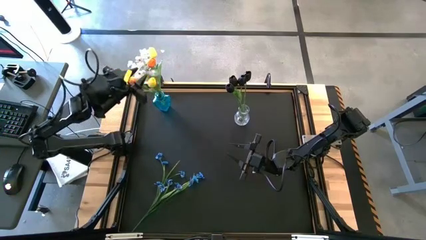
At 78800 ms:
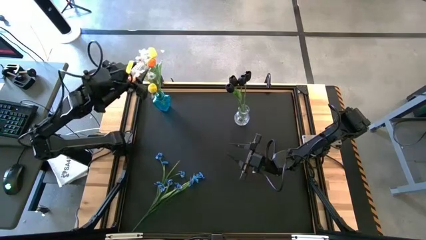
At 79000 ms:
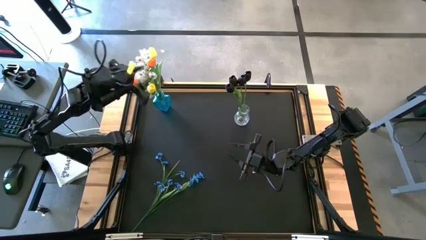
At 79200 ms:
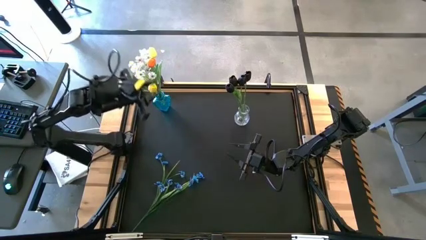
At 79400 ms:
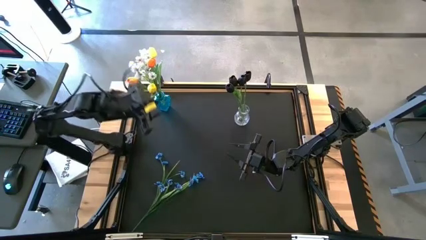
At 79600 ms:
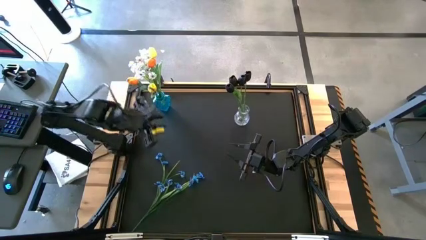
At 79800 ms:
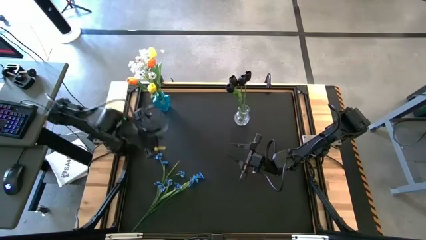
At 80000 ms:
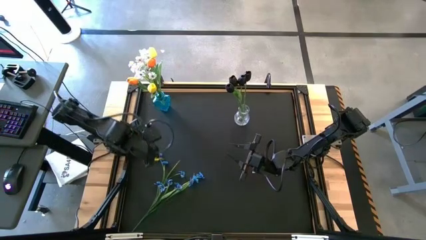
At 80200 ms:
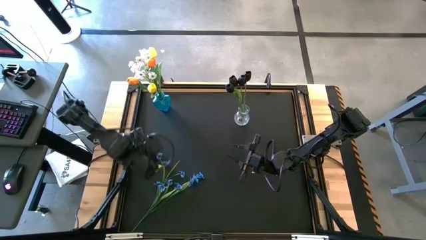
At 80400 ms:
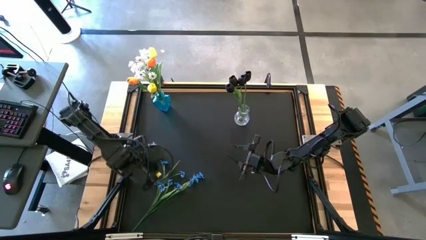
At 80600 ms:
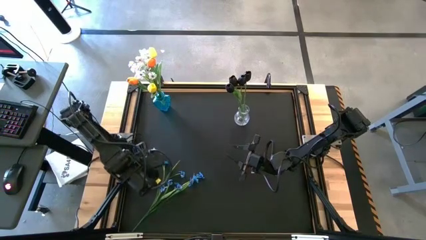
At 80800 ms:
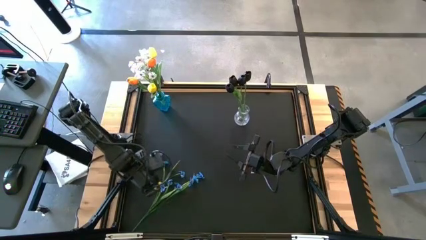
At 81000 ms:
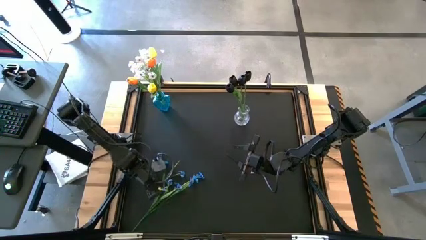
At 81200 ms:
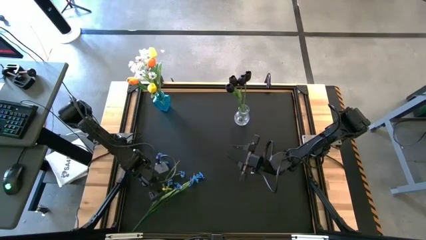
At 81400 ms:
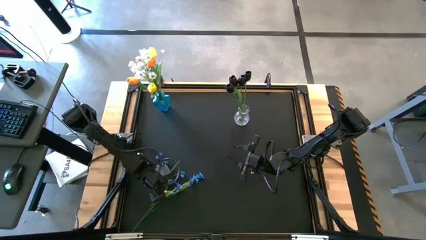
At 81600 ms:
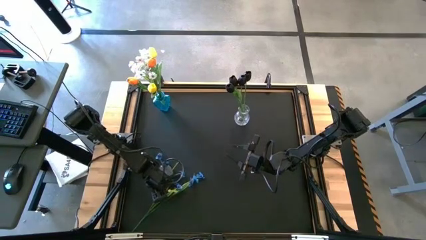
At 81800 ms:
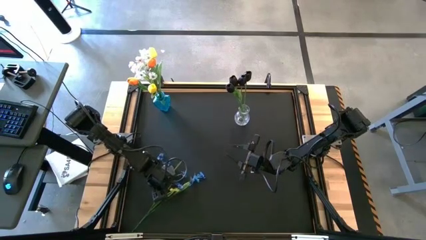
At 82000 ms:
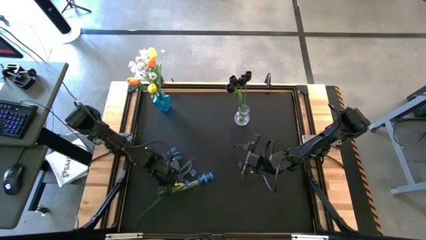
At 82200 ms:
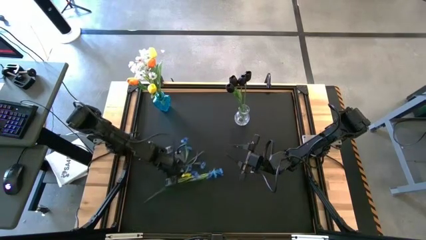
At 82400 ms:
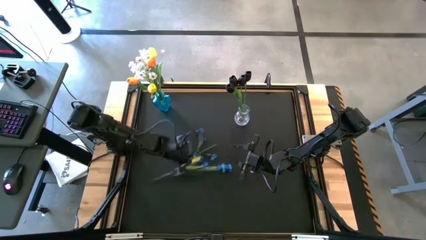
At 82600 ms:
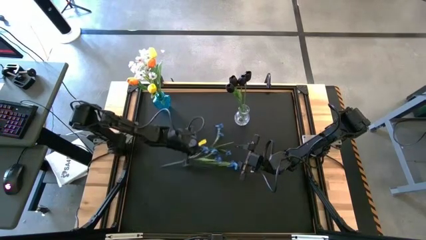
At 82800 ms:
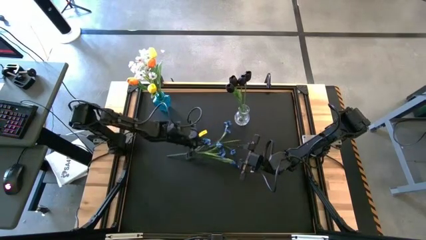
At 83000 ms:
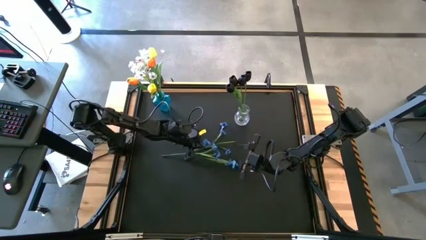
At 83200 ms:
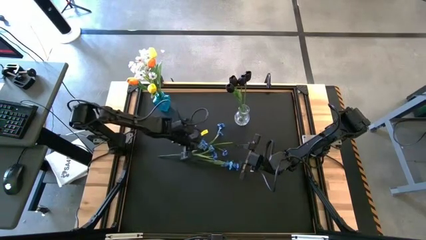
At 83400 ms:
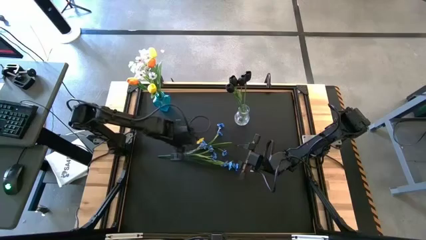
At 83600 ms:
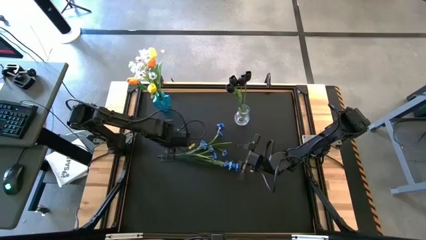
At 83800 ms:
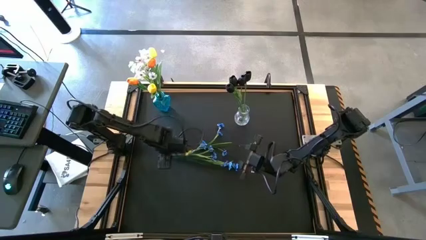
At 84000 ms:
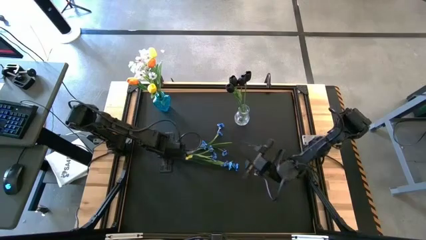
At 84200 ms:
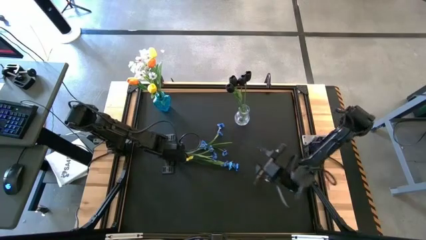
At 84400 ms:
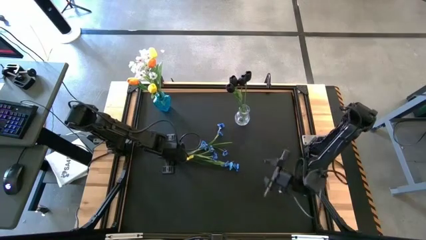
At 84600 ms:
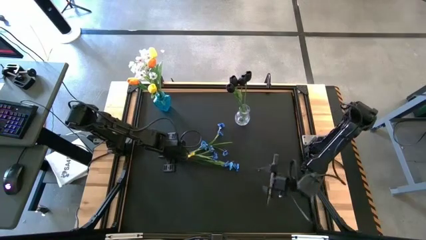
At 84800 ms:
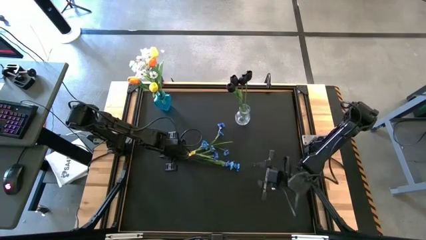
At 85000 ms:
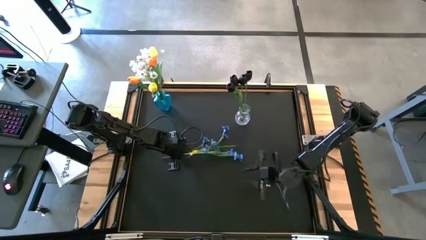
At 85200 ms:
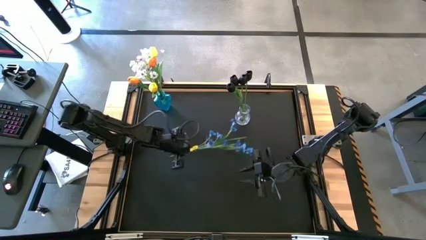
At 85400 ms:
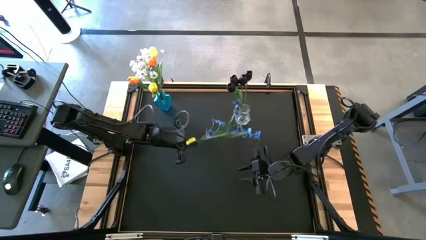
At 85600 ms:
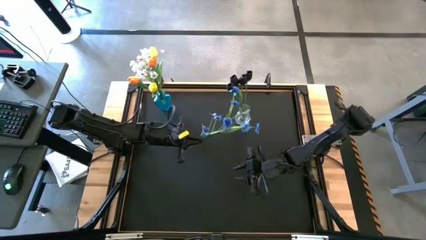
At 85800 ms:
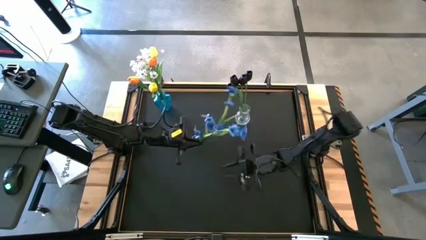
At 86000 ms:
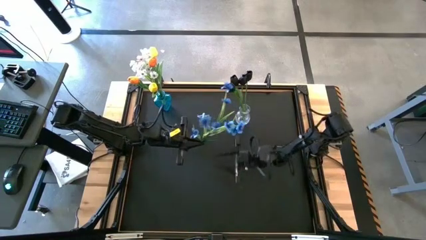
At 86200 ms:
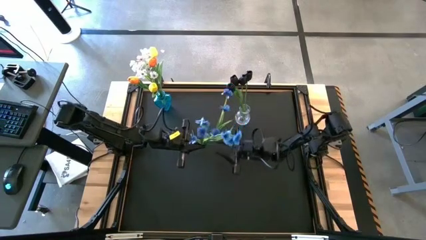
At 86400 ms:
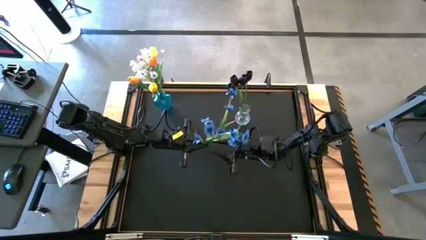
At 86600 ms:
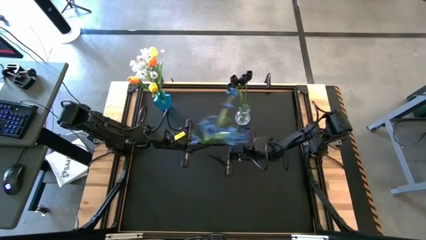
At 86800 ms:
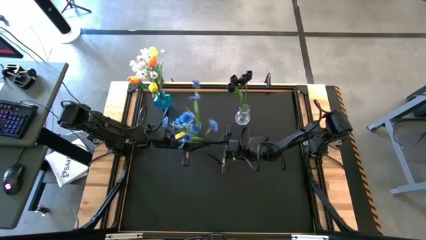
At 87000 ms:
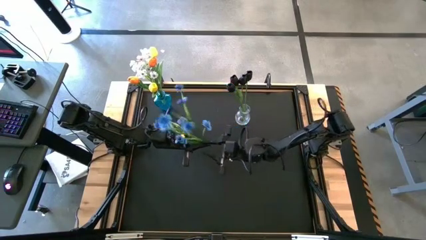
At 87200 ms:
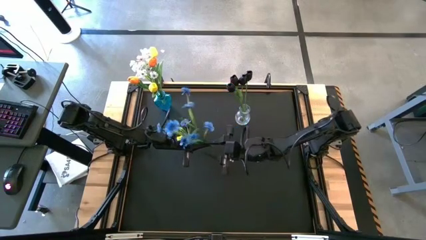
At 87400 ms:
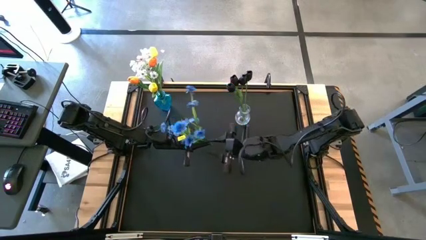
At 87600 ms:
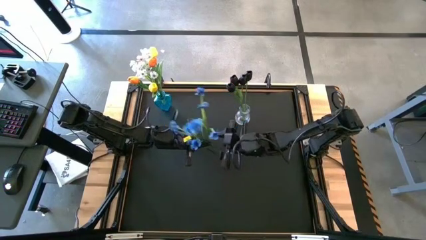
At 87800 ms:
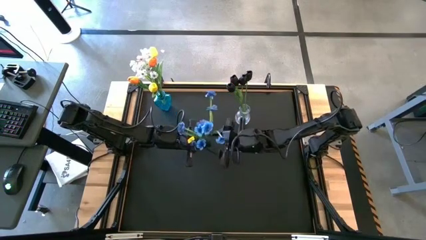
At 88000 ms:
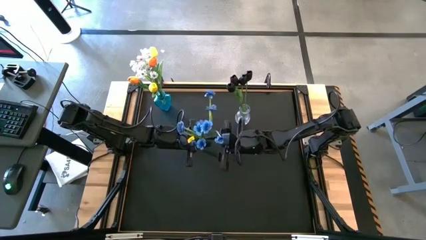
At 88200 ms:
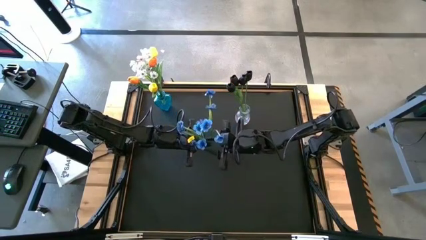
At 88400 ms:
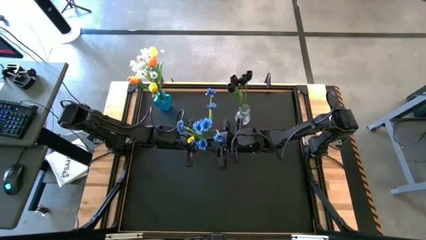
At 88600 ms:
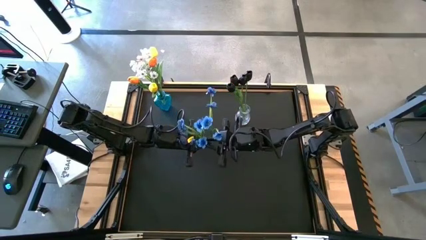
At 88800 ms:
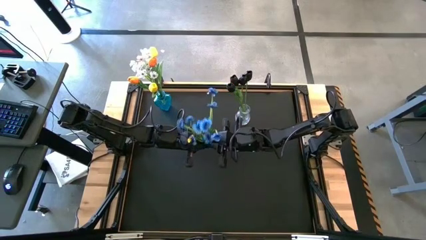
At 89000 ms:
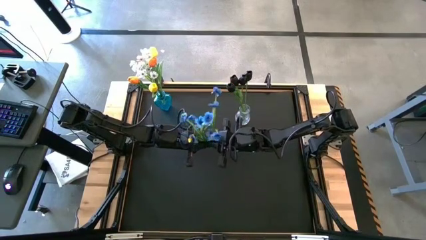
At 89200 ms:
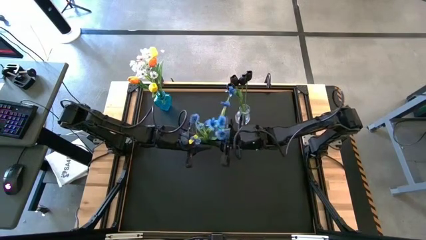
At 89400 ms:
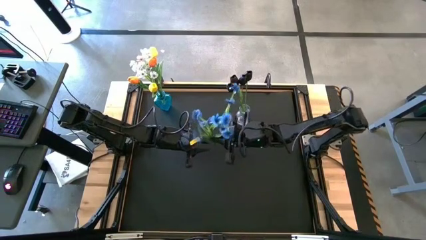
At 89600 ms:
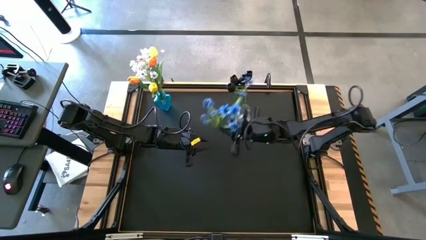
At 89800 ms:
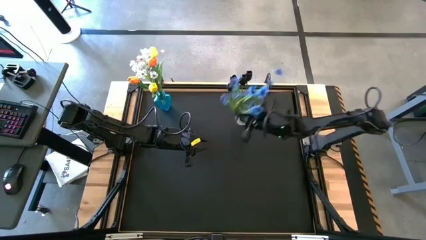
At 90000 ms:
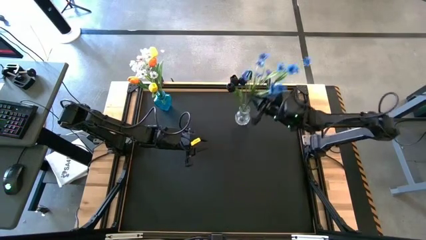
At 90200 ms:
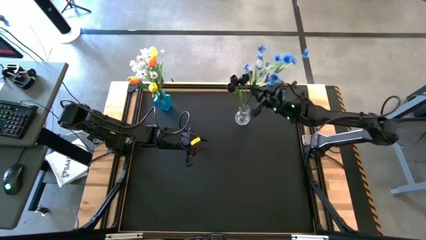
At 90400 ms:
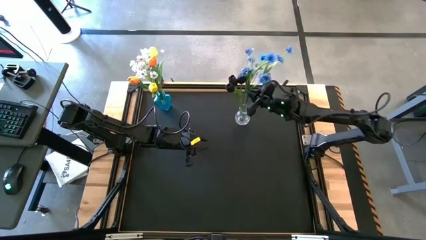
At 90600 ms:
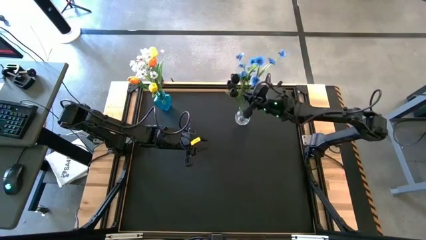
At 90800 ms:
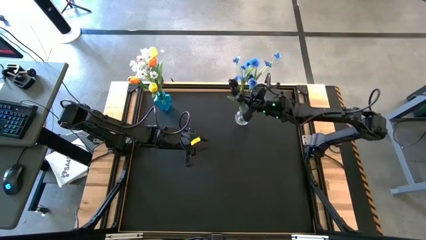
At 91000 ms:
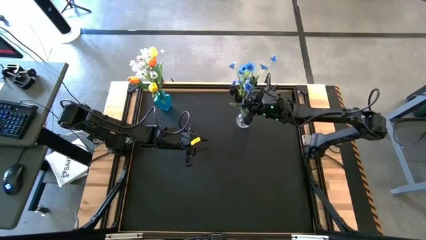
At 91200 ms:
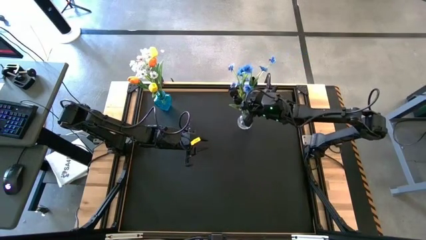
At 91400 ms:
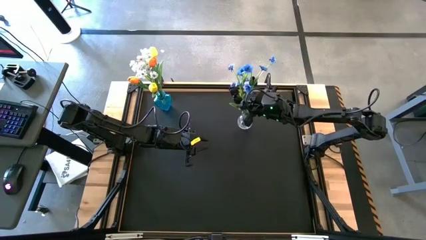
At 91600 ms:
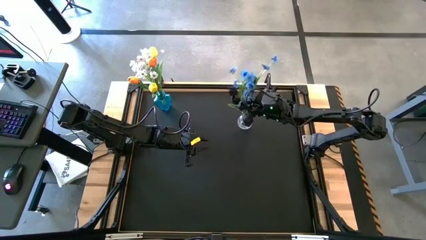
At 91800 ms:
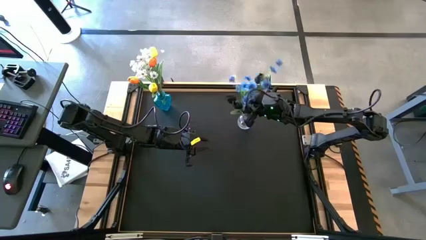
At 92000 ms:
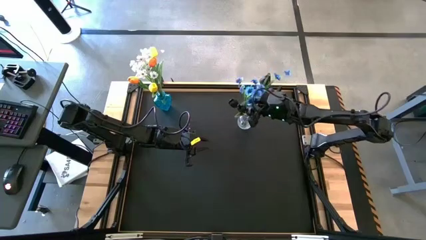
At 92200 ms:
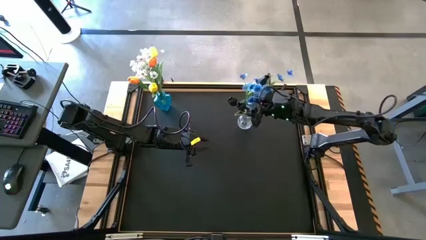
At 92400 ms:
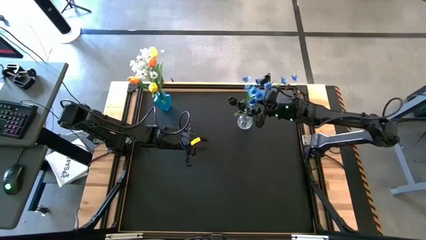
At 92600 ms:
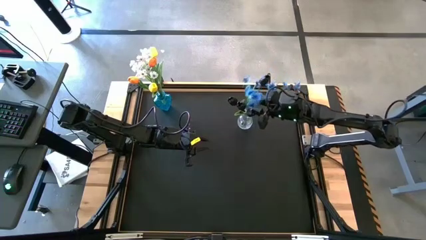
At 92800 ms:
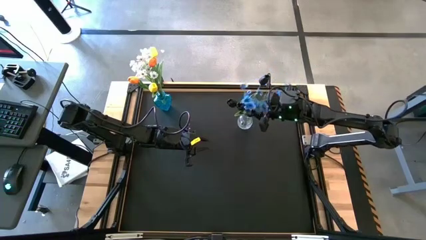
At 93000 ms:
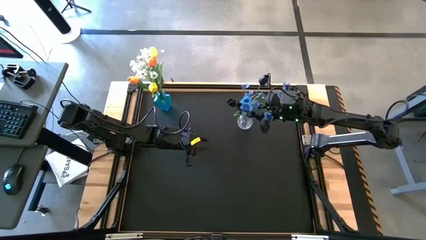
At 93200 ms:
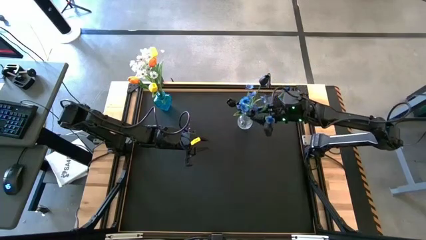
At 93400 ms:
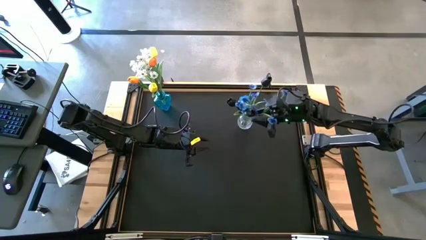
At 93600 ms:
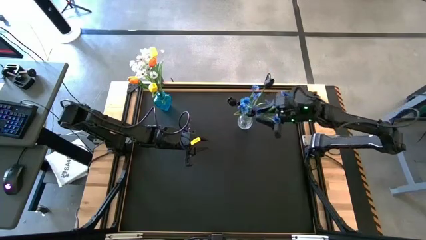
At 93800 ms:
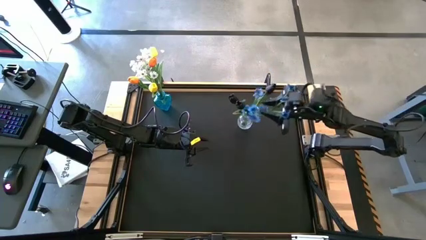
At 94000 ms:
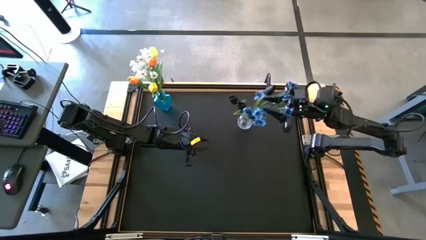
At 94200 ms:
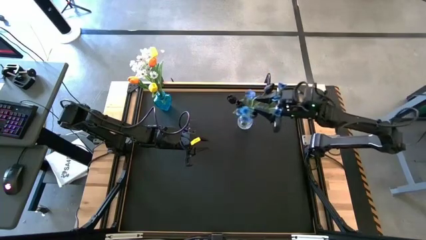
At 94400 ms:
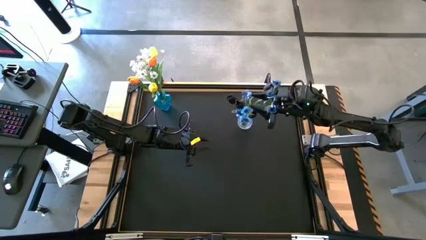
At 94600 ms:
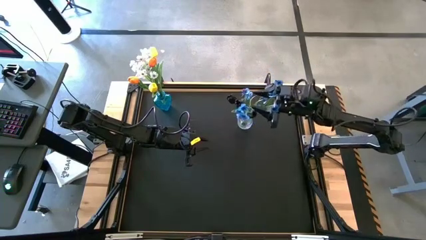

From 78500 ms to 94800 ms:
Task: Sort flowers into vase by color
Put the blue flowers into the transparent vase
